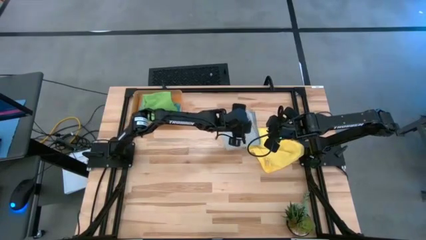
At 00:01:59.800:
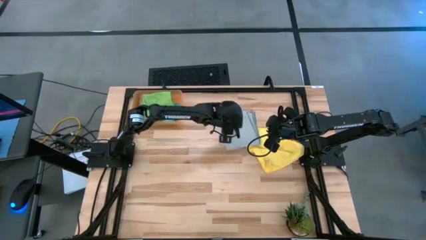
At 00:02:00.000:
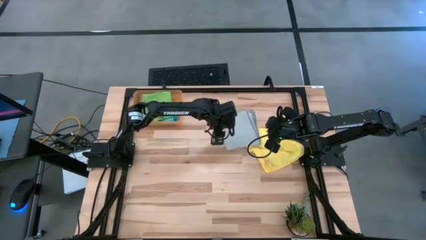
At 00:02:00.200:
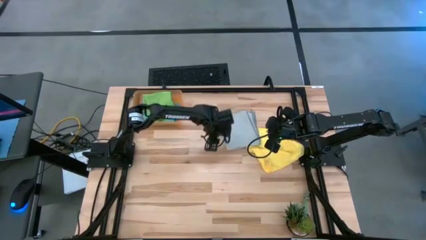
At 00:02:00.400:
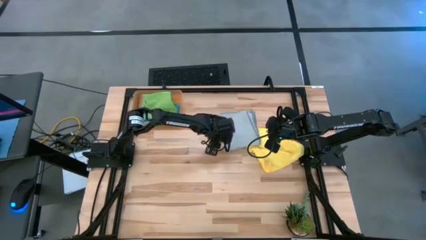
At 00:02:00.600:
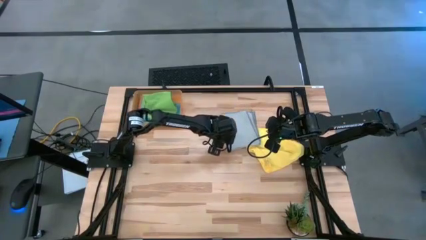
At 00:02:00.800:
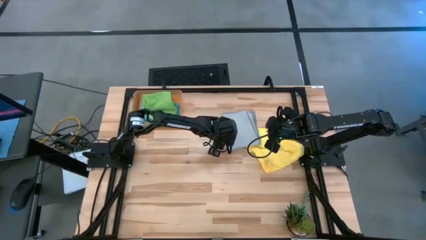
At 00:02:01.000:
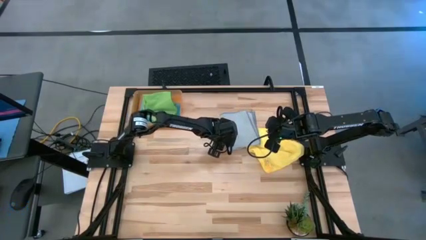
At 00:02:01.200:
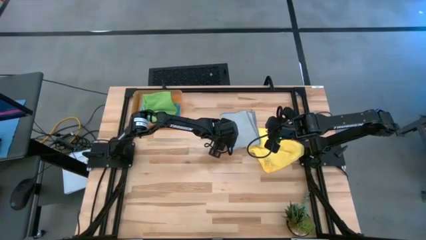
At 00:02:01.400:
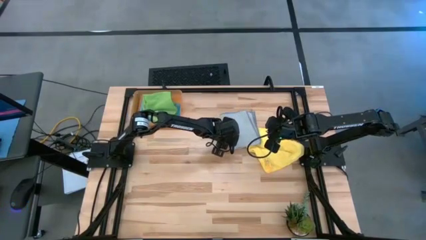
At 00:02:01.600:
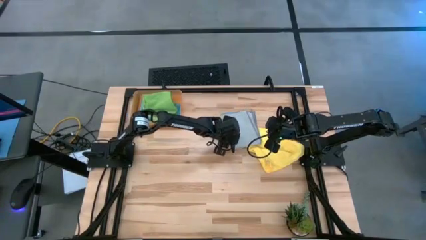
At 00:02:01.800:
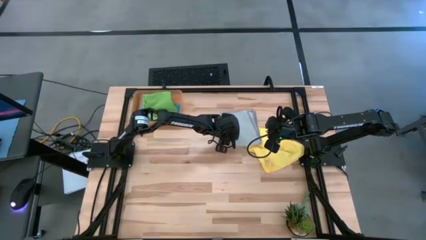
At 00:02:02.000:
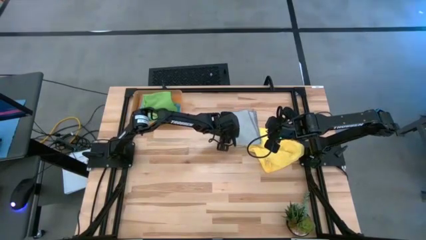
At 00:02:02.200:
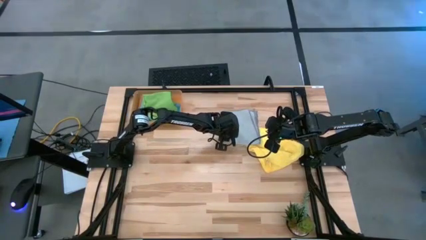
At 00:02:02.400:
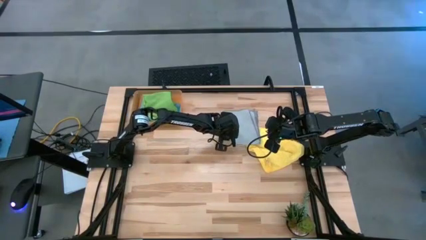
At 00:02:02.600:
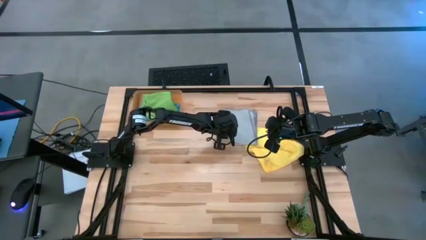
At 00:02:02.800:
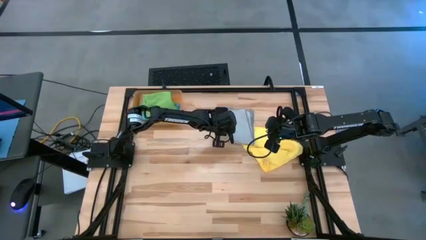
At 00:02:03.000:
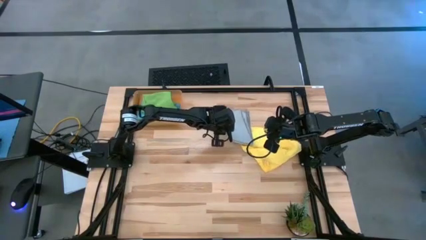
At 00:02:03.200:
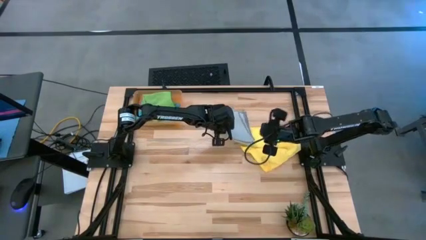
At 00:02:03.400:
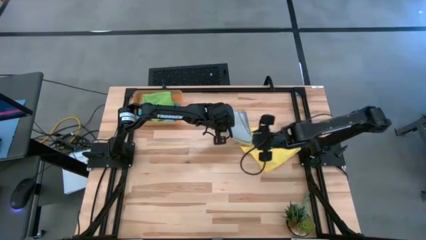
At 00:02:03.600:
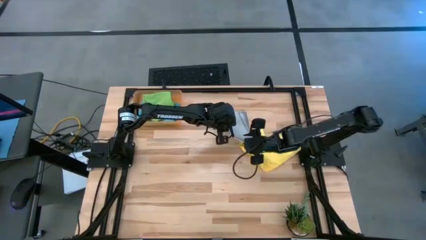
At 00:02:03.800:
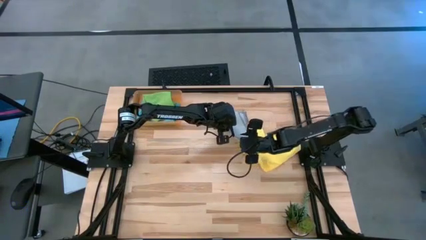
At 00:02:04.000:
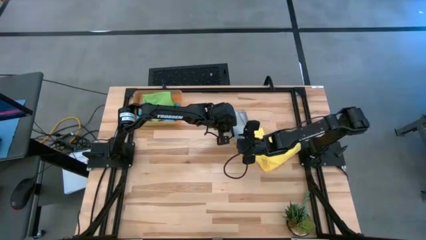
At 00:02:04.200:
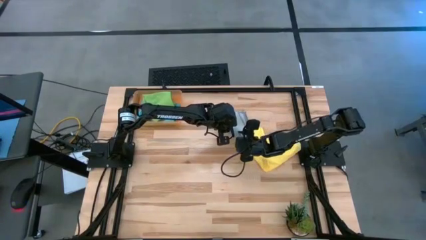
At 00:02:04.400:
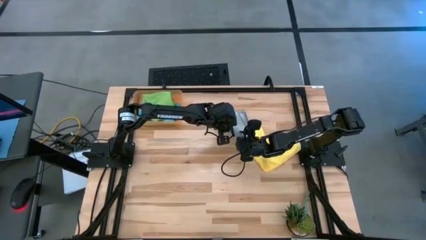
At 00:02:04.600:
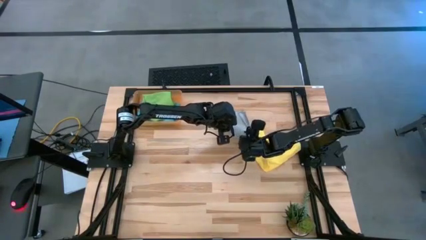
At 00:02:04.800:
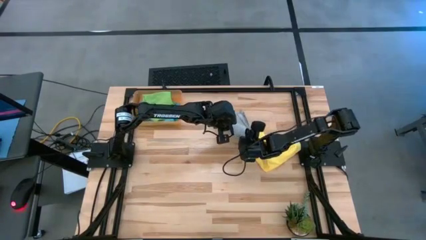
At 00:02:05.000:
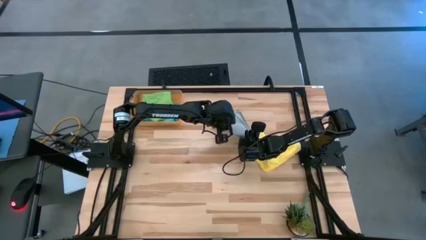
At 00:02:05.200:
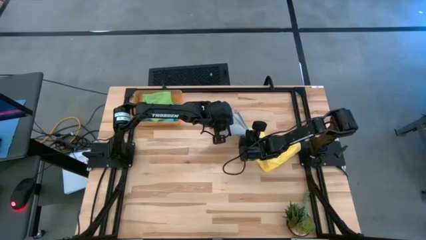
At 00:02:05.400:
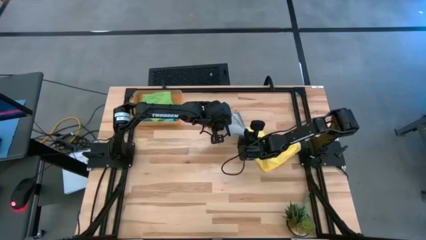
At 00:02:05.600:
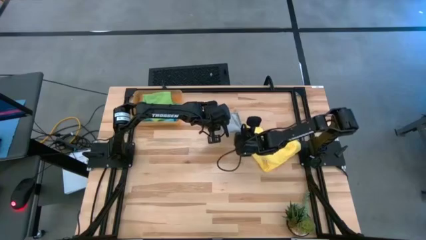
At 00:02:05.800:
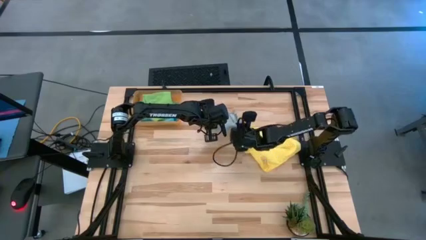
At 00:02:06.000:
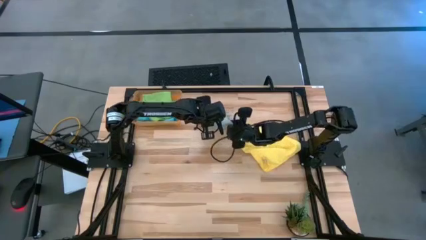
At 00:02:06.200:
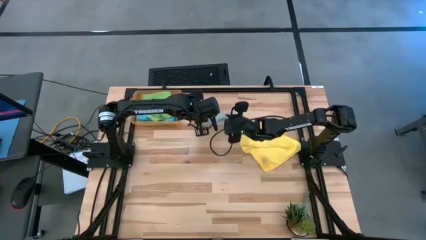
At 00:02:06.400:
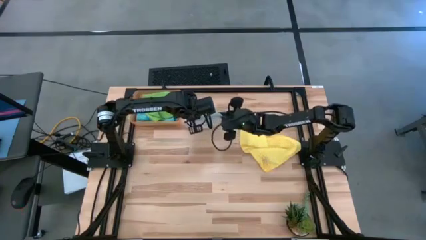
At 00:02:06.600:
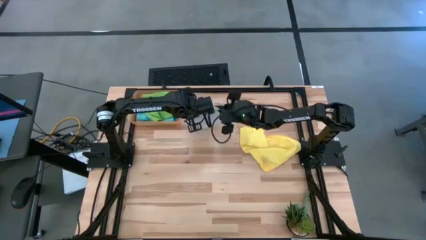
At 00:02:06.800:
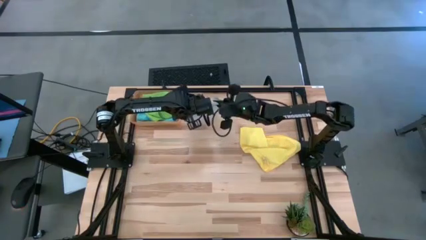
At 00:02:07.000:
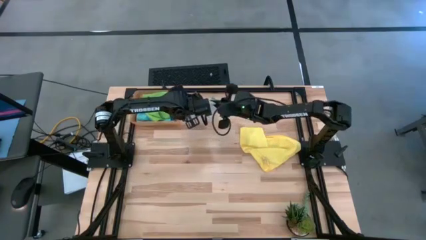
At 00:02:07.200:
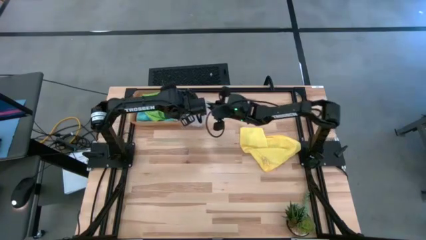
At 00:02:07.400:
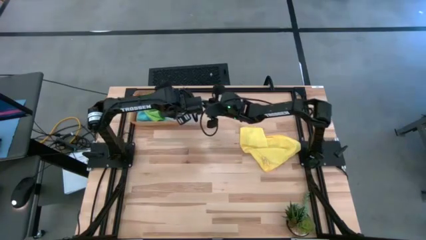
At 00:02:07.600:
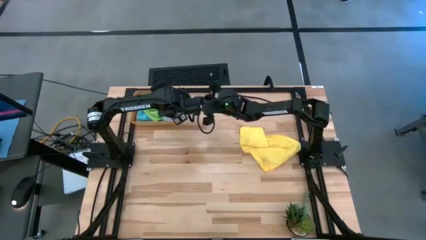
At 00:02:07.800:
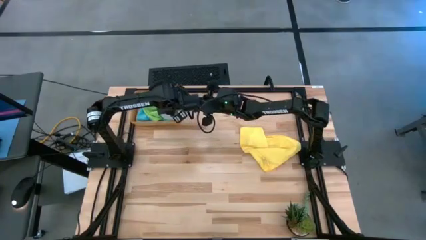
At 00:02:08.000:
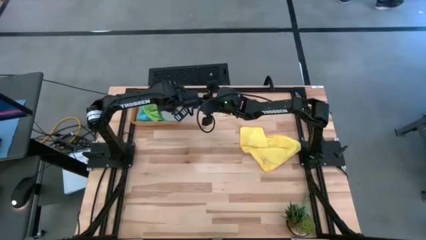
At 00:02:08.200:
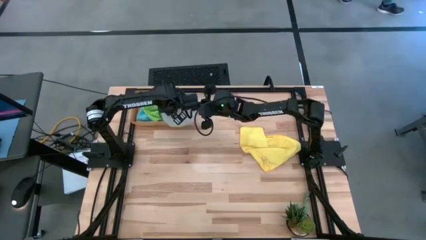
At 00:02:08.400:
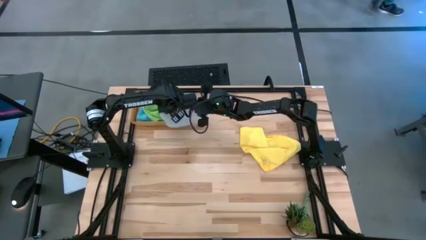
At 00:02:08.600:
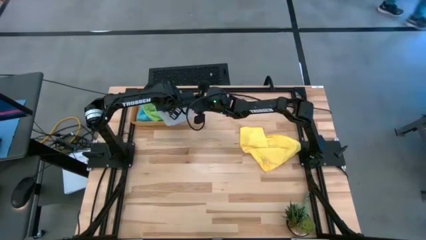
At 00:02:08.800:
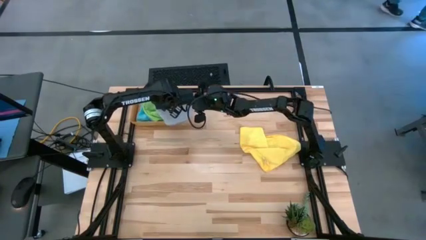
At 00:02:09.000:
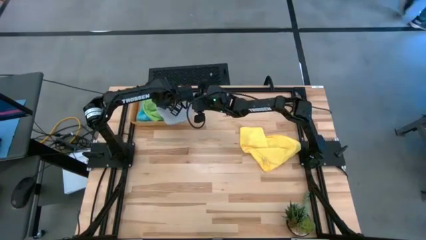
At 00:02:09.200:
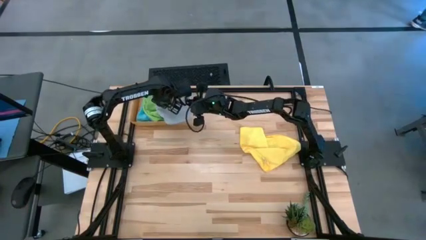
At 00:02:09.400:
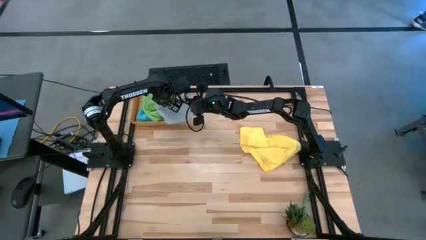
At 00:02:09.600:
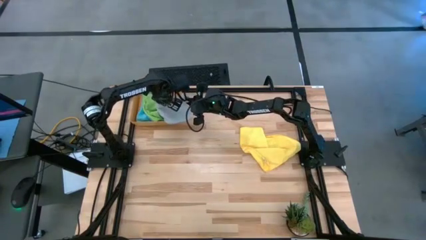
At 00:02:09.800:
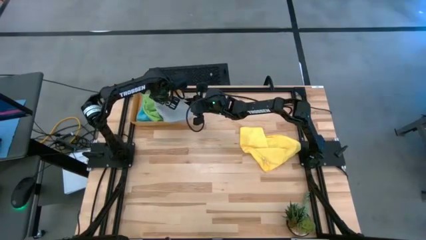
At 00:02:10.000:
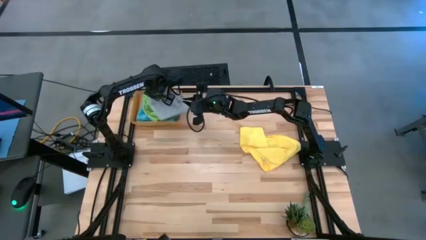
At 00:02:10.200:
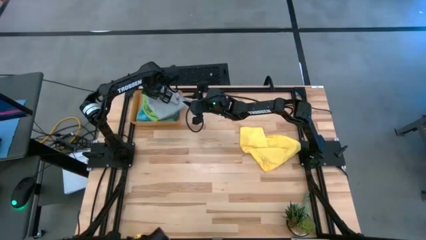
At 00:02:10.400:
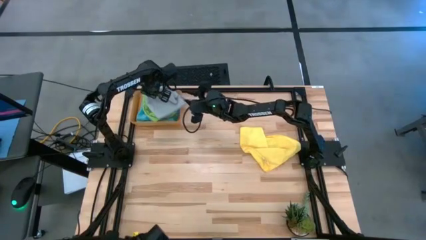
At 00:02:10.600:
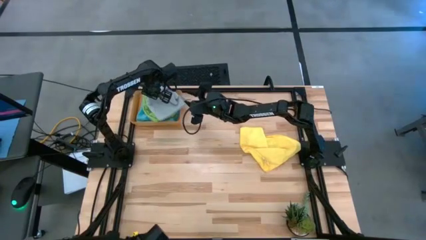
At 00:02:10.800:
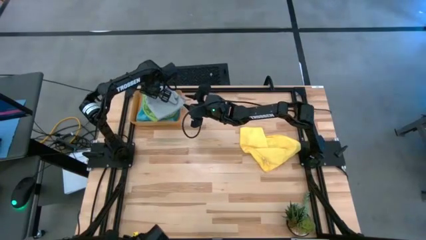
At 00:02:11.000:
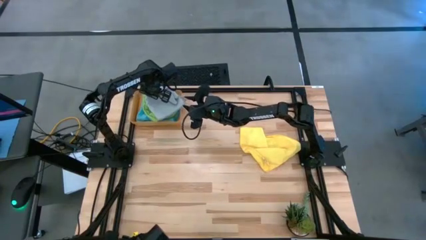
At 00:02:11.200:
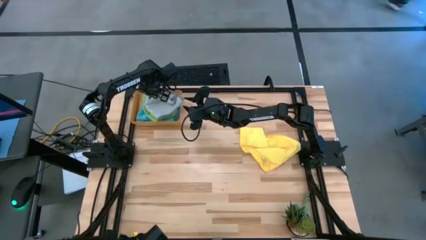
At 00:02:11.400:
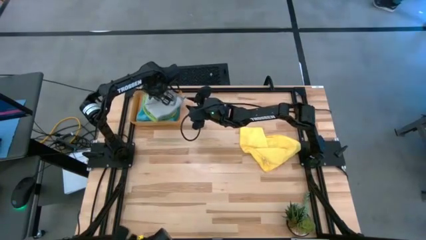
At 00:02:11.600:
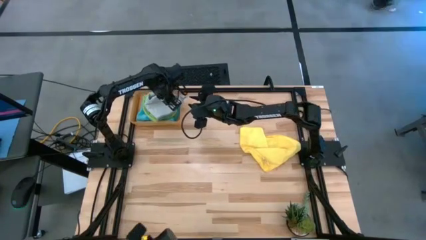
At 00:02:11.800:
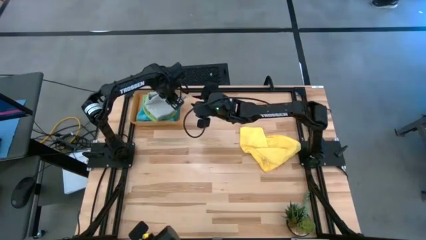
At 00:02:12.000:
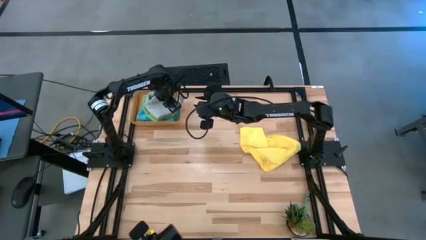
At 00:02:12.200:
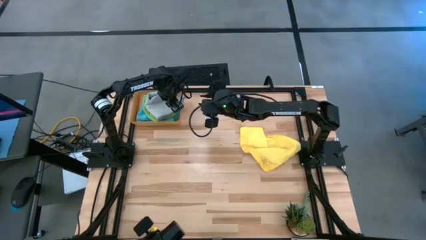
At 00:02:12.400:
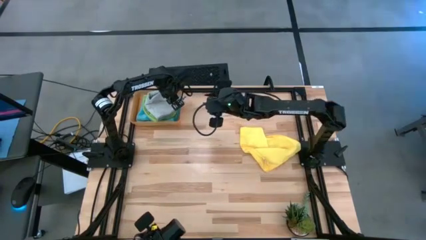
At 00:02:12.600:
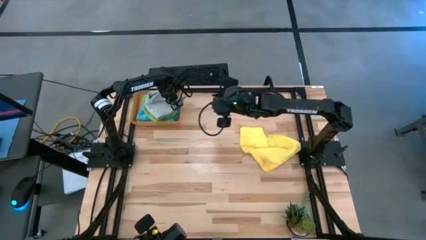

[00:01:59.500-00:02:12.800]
Task: Fold microfiber towels
Put the gray microfiber cloth into the orange bin

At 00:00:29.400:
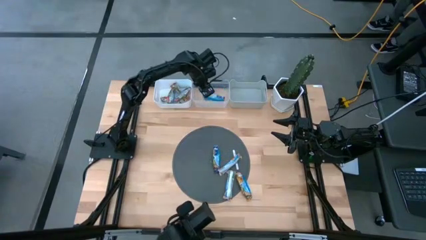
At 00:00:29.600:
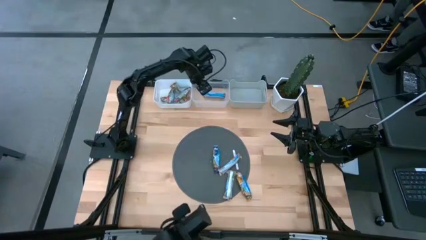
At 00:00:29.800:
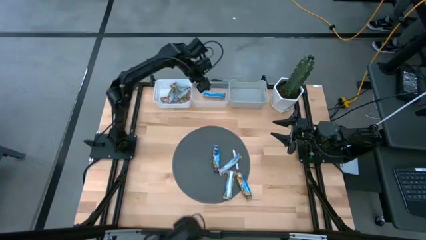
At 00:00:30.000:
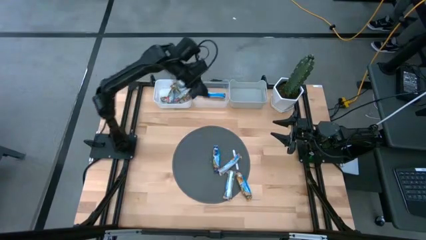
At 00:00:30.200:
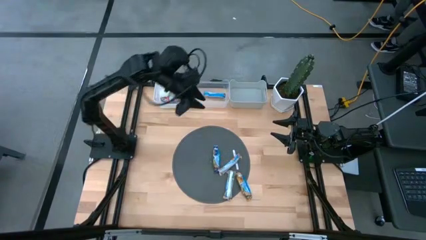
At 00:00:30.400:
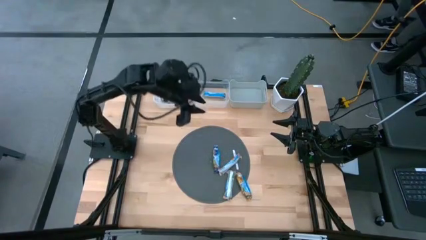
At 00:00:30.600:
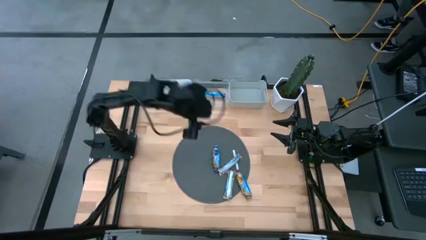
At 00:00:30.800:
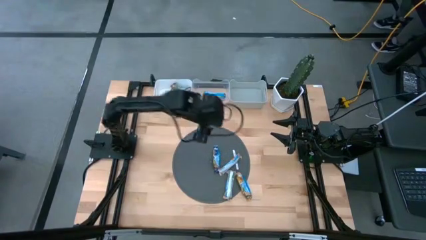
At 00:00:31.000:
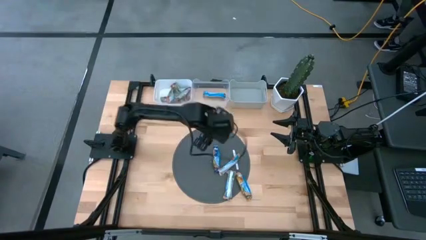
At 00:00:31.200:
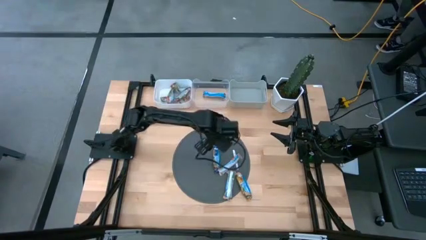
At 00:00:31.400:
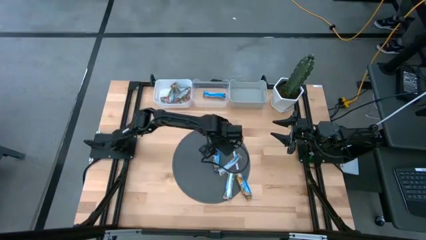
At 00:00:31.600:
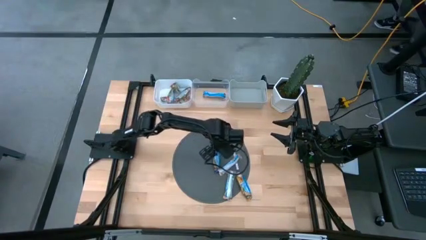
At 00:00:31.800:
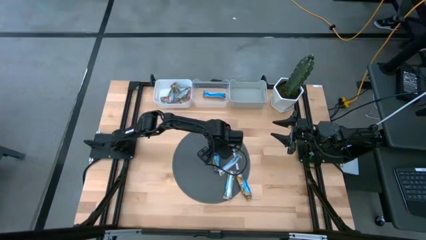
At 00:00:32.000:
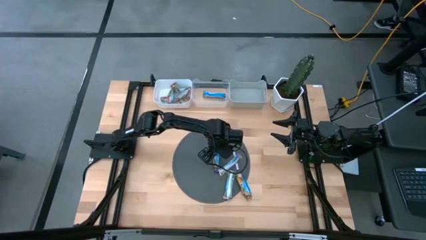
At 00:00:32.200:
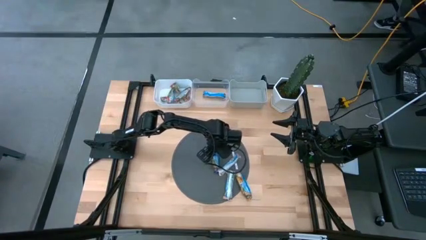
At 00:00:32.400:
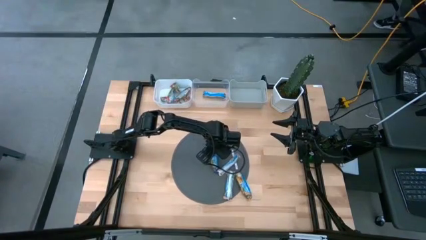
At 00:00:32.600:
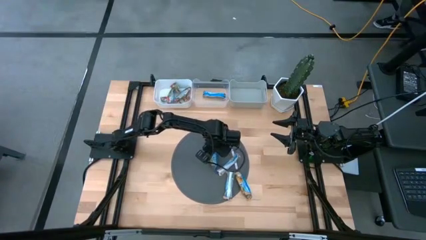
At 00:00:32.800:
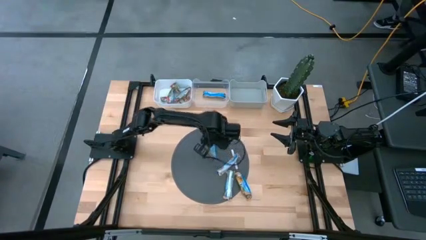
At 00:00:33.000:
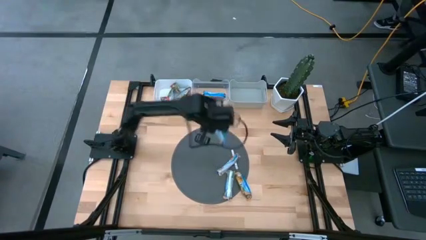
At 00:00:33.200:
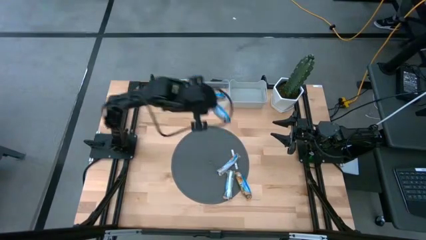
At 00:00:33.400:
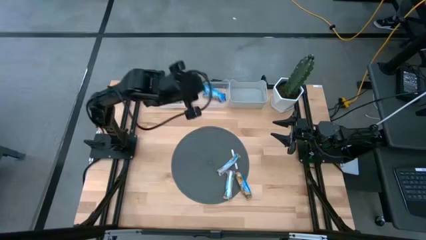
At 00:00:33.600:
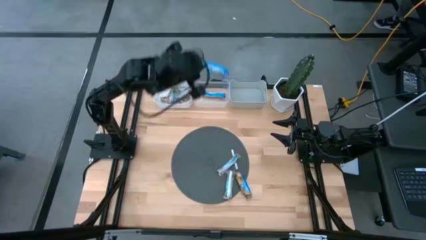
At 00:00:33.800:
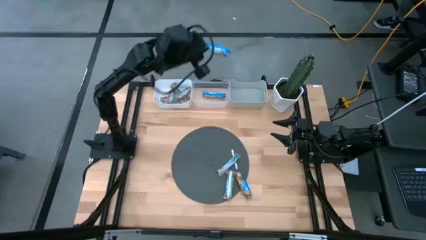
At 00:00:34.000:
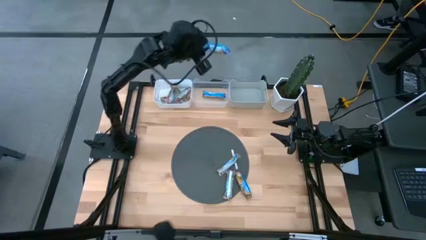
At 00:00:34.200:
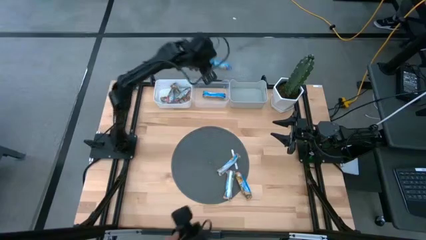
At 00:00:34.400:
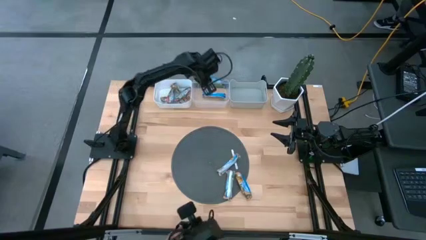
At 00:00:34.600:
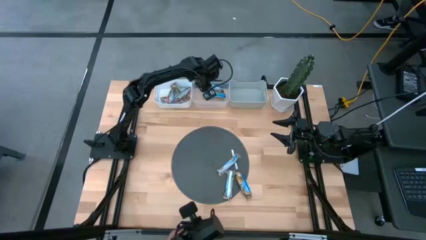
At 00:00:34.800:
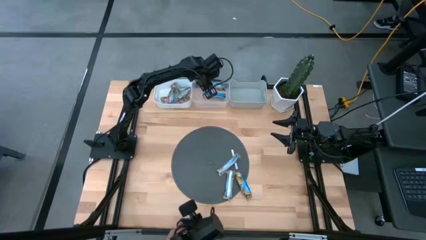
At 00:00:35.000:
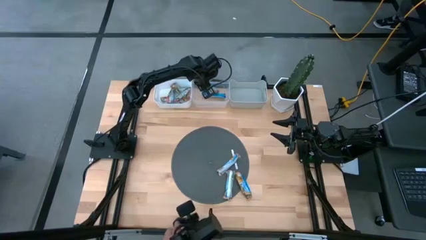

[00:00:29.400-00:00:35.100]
Task: Pick and place Granola Bars by type
Put the blue granola bar into the transparent bin
